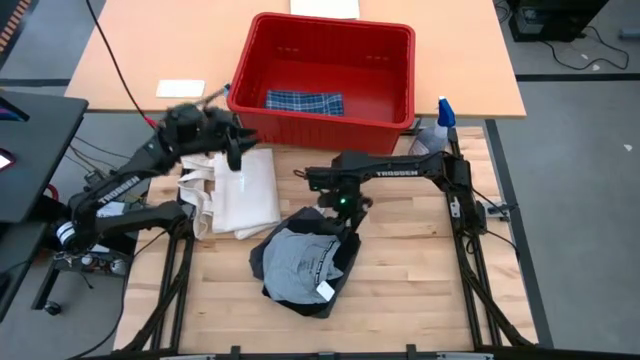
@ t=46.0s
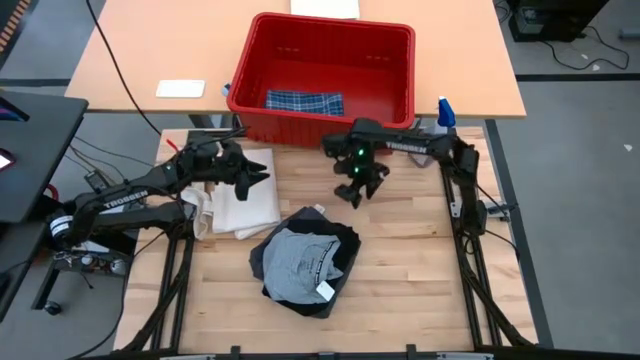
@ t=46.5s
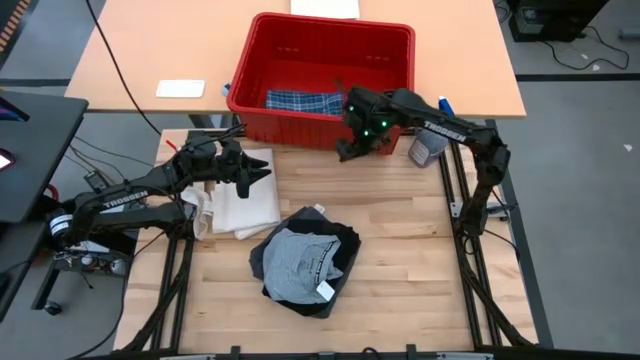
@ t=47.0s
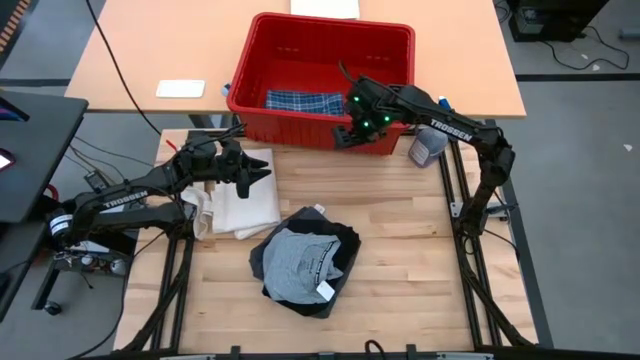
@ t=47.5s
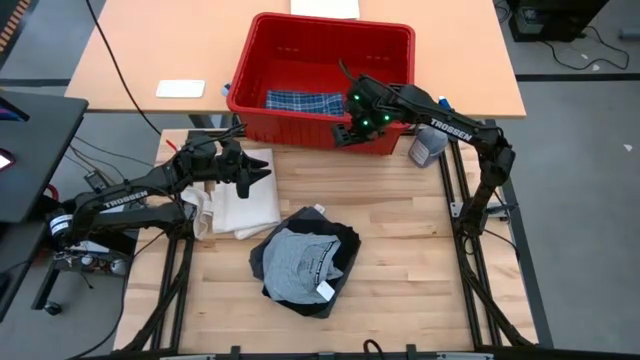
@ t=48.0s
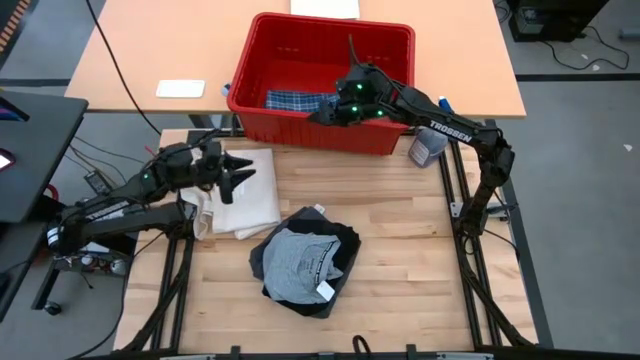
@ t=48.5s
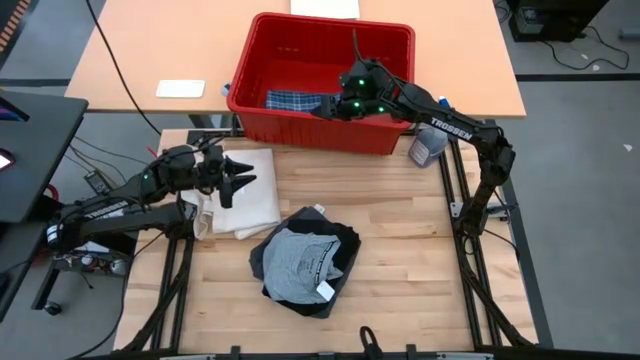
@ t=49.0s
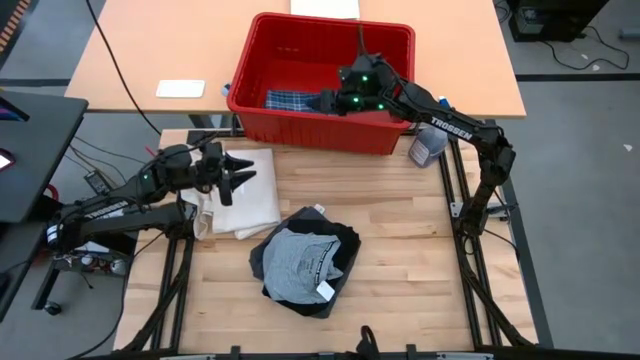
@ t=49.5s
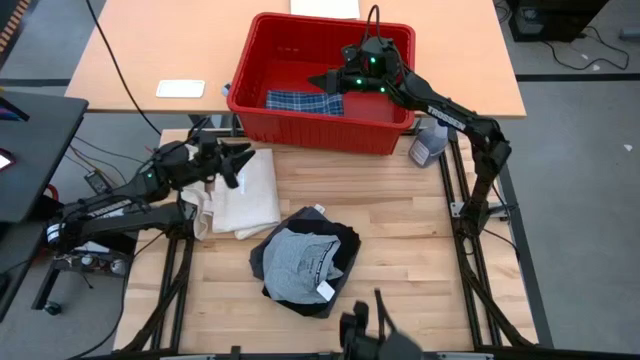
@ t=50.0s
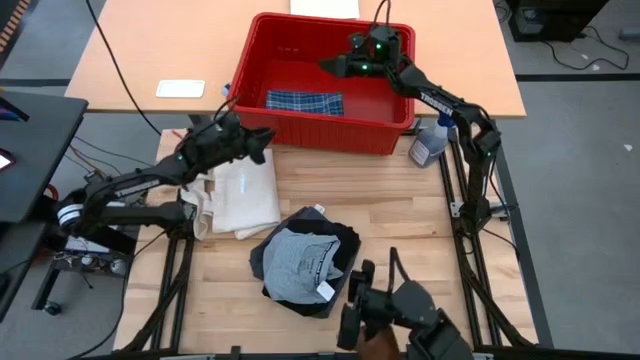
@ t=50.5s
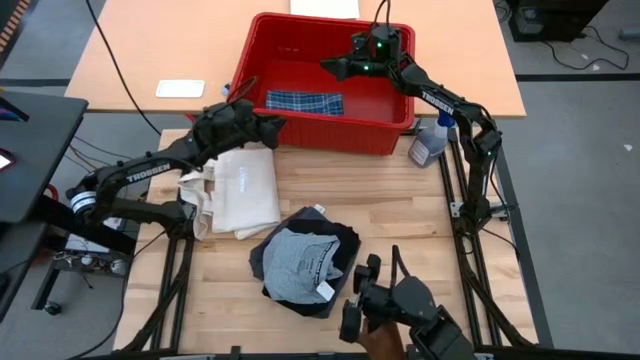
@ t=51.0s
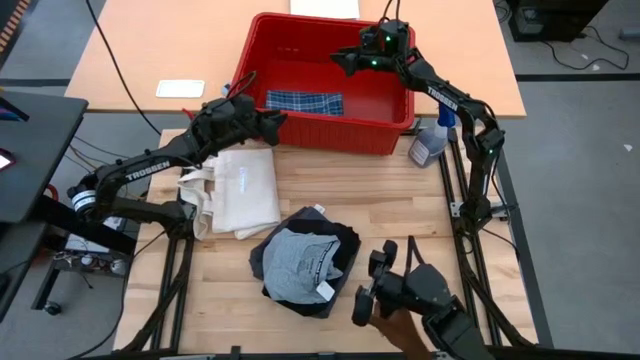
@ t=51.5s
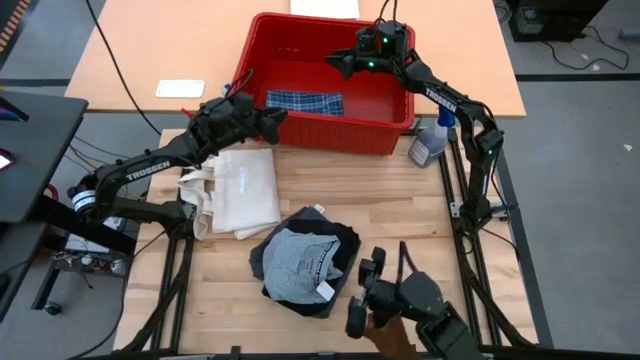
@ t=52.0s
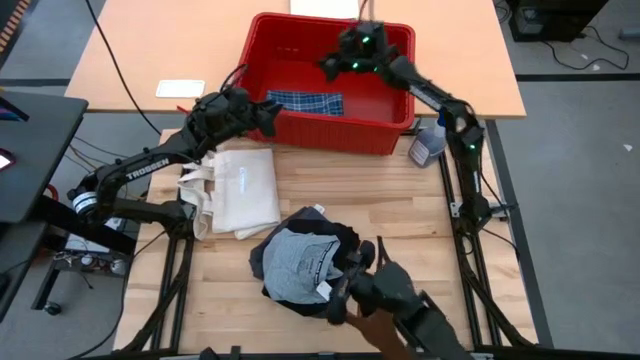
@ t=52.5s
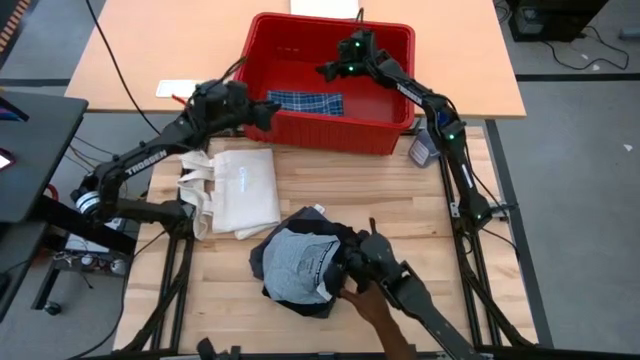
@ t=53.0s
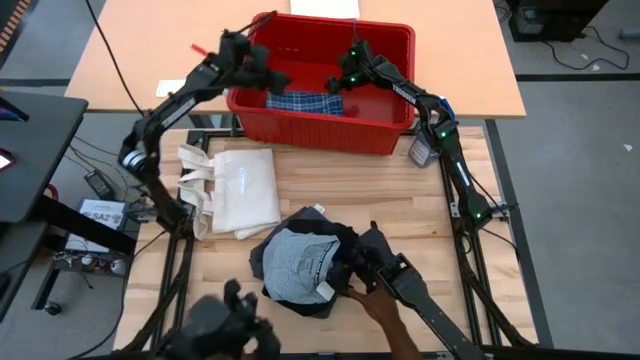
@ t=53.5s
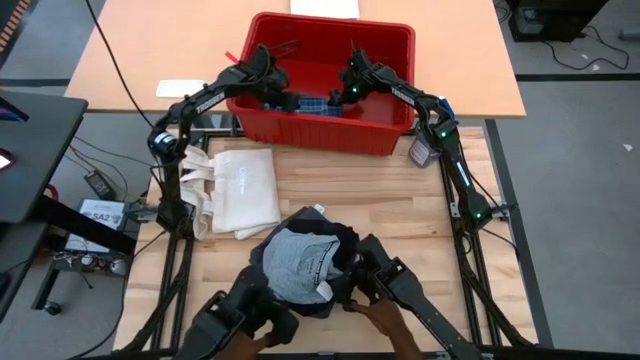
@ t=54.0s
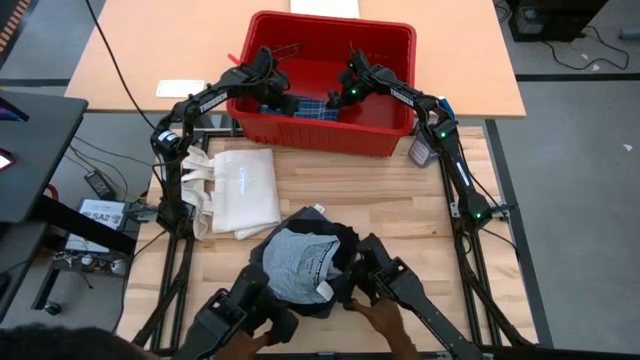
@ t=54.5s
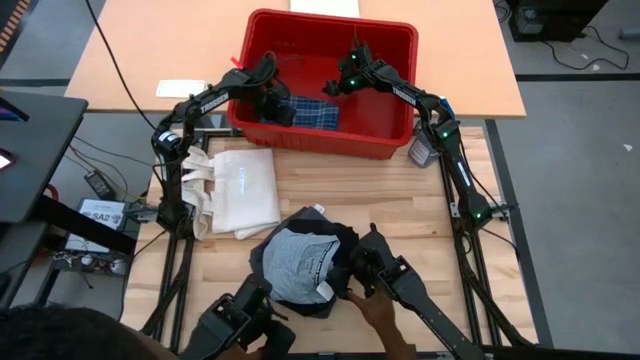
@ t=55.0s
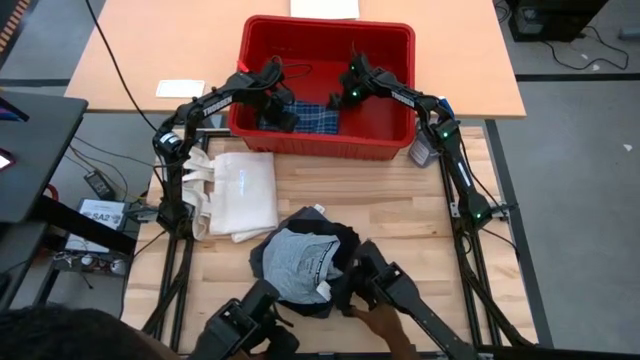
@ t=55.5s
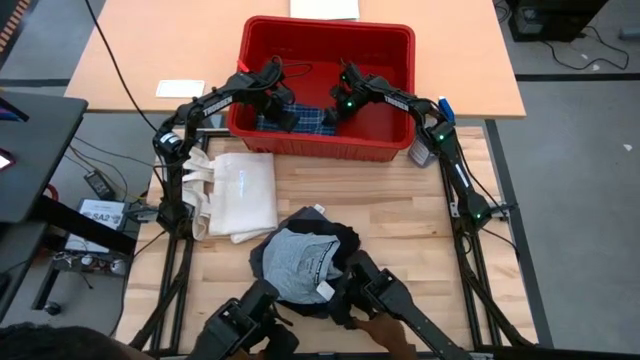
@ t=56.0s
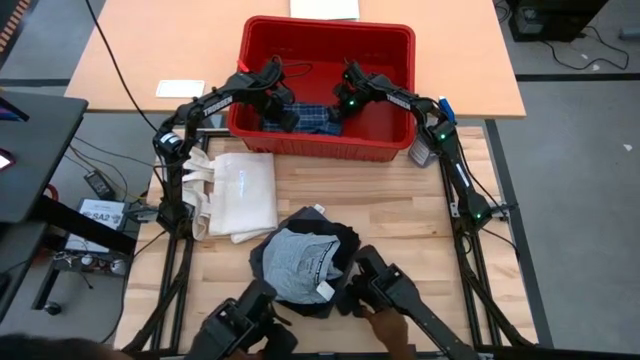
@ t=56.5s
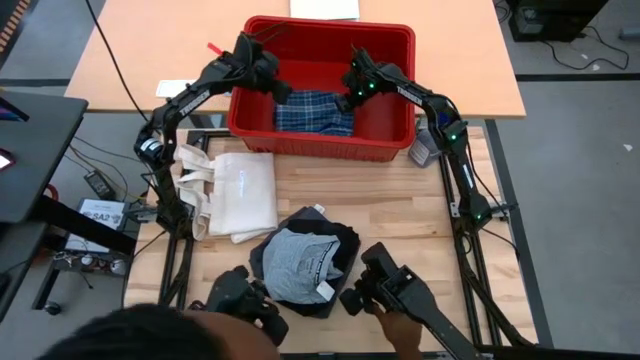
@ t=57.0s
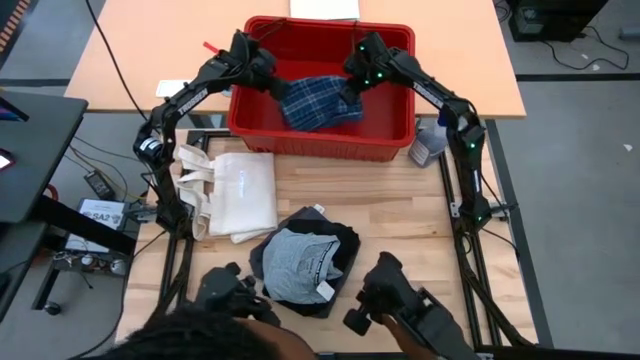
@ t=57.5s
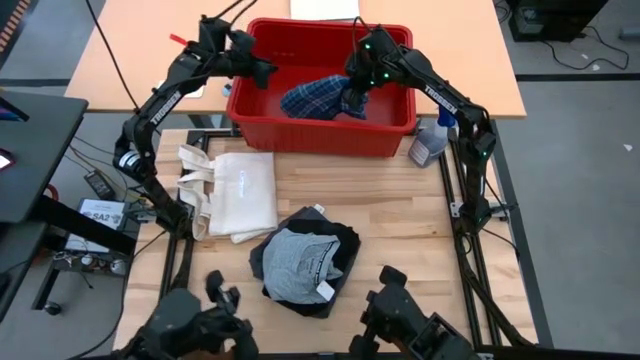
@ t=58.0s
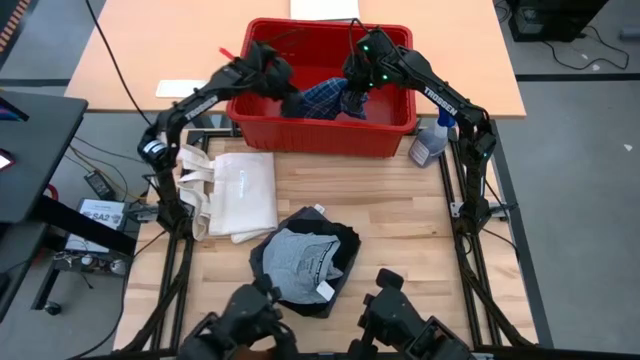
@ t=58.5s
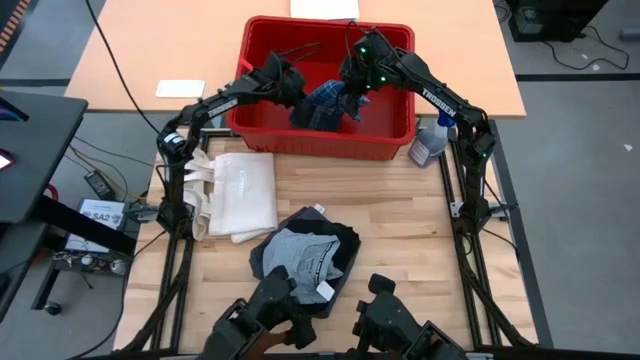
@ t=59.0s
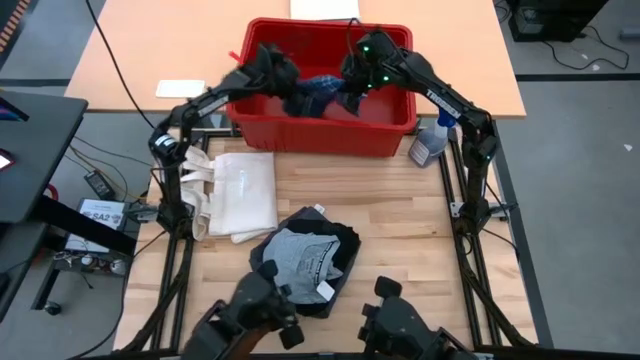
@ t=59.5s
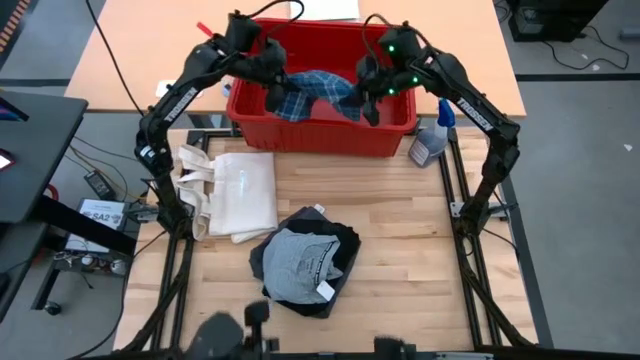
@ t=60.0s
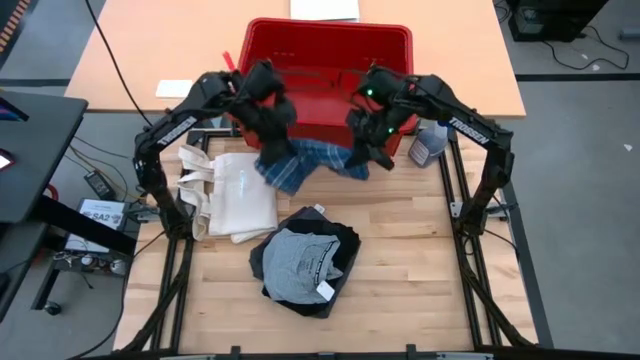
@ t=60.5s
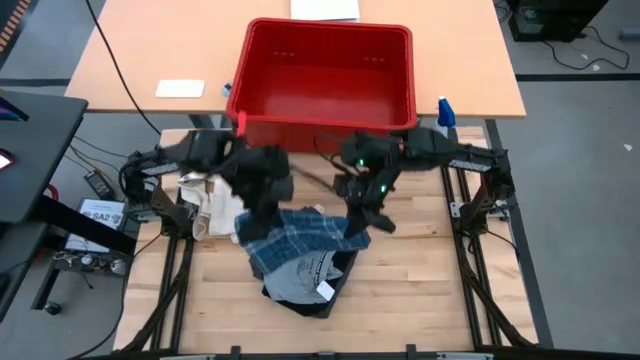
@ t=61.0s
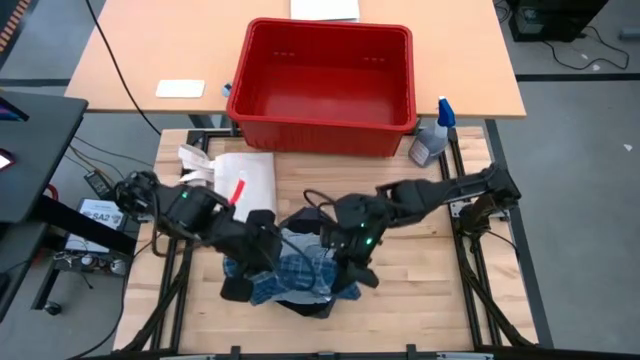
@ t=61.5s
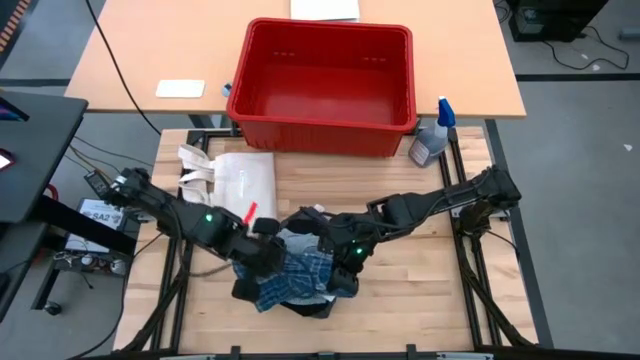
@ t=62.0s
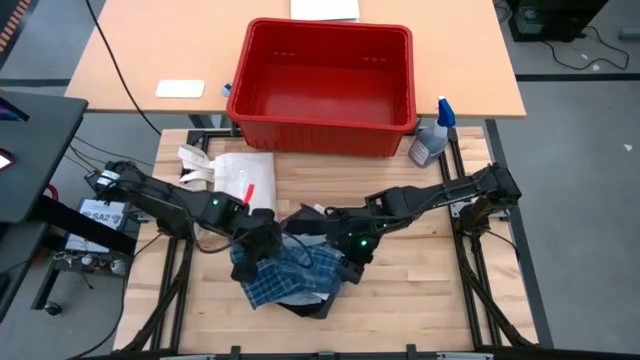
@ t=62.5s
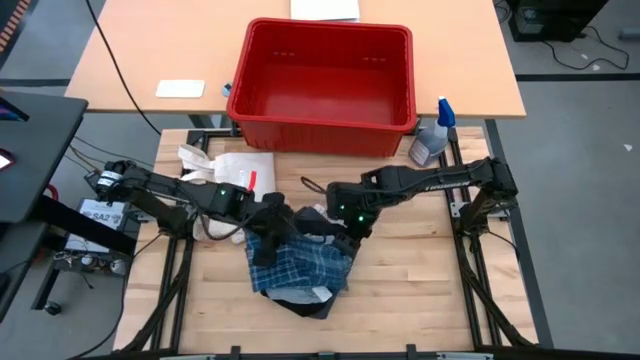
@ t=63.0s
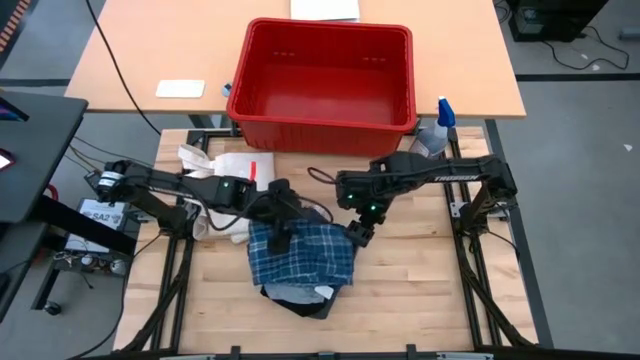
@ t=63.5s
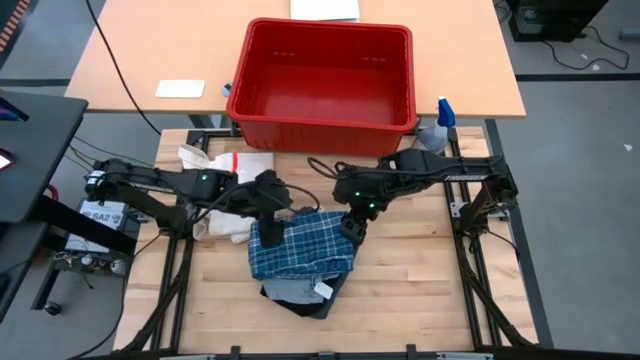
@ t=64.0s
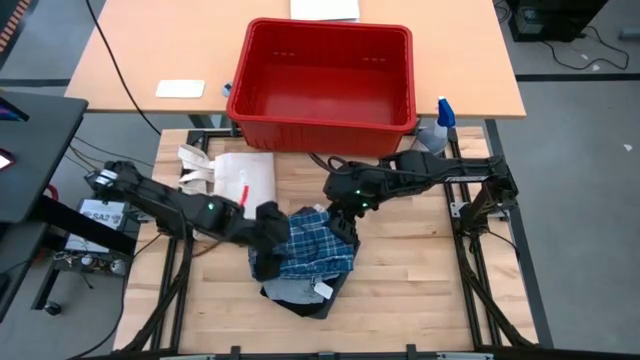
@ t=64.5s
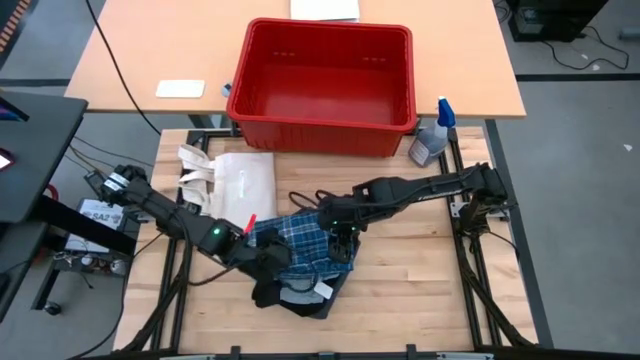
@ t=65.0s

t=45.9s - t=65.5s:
Task: Sort clothes
Remove the blue pants from the red bin

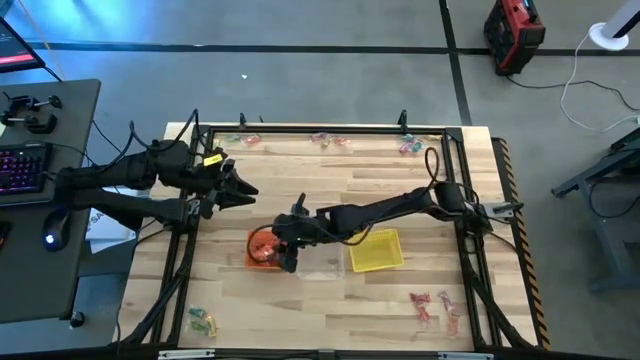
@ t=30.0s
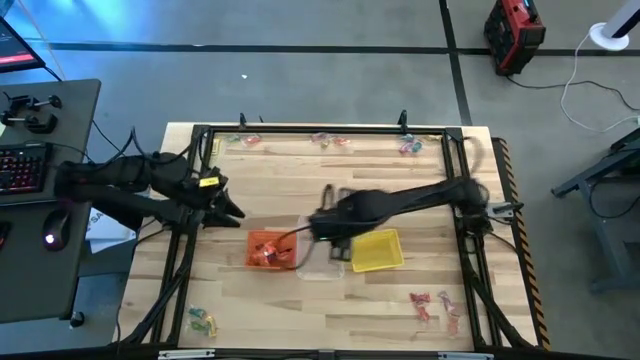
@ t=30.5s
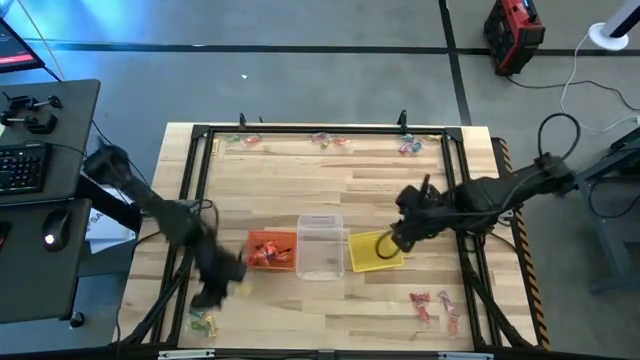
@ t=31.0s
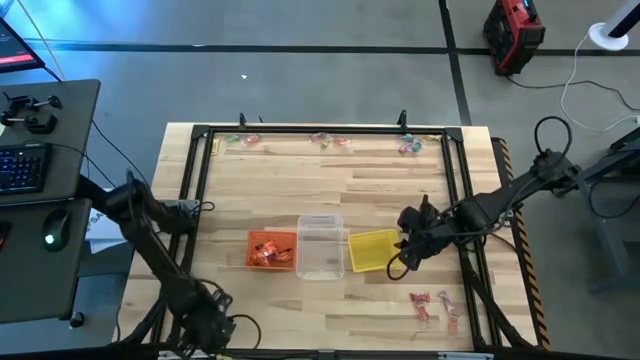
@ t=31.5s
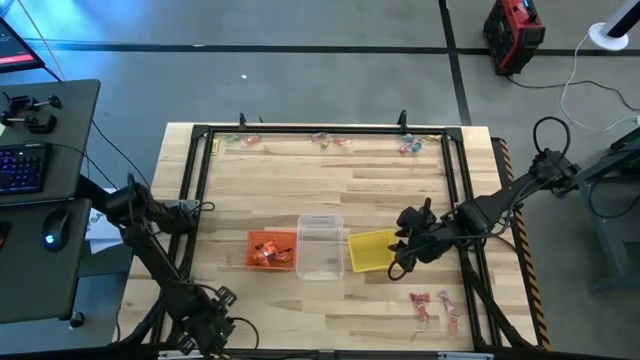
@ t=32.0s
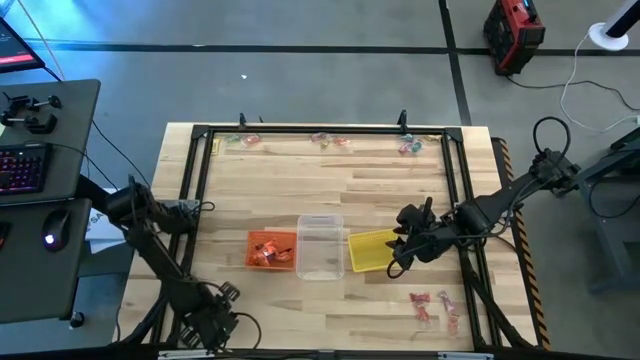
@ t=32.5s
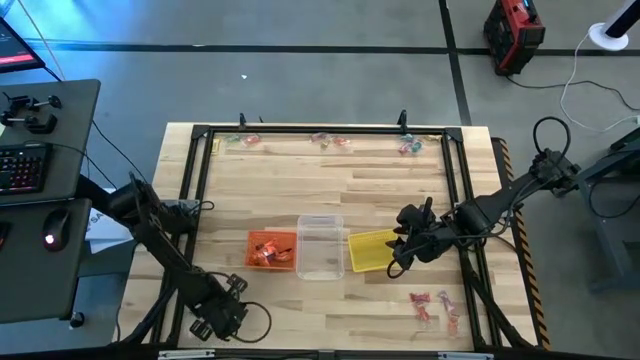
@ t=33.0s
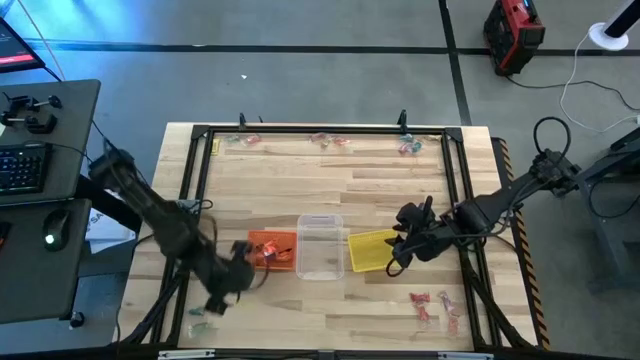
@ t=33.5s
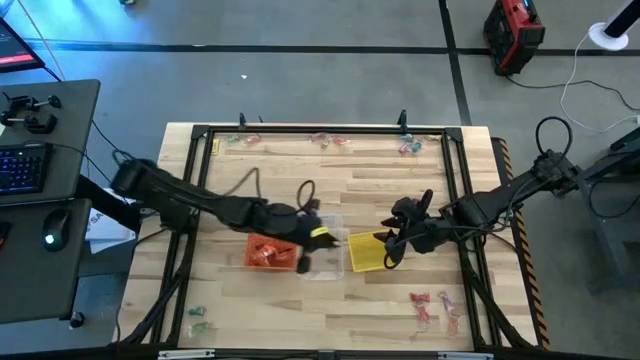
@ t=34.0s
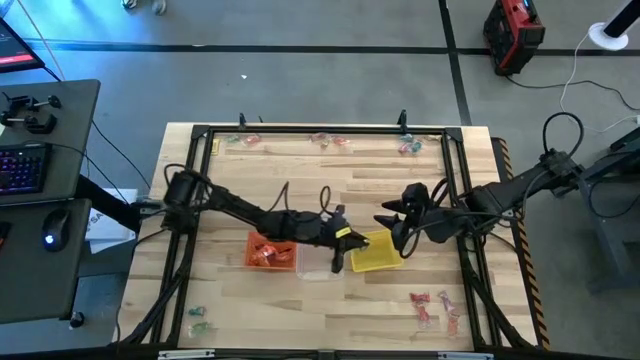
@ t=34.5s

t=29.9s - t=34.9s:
Task: Sort candy by brand, put in halloween buckets
Put the yellow candy into the yellow bin
